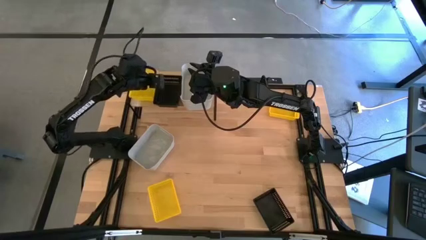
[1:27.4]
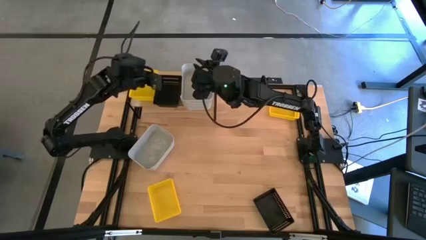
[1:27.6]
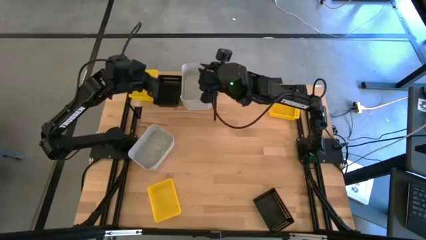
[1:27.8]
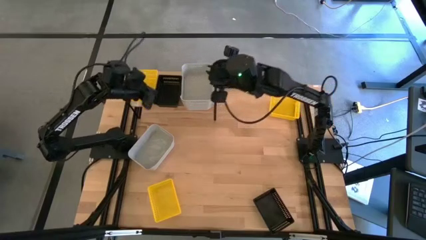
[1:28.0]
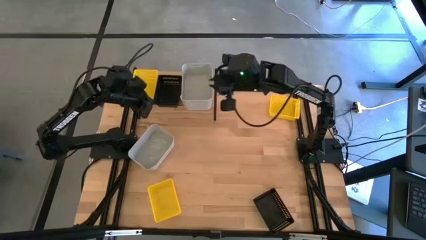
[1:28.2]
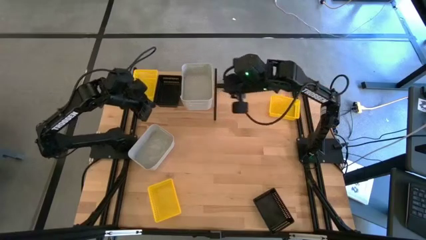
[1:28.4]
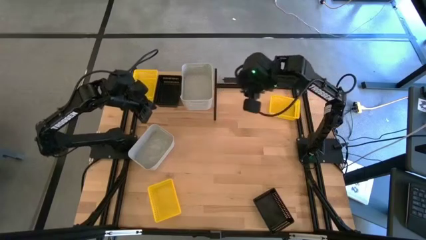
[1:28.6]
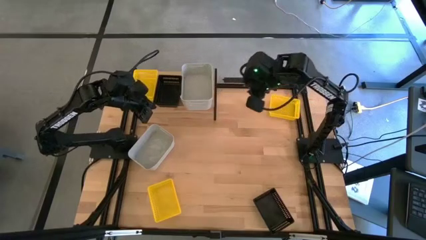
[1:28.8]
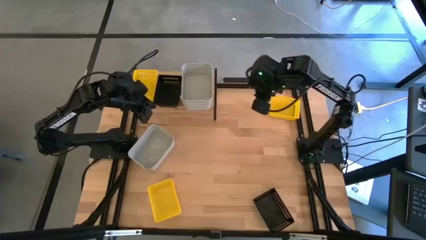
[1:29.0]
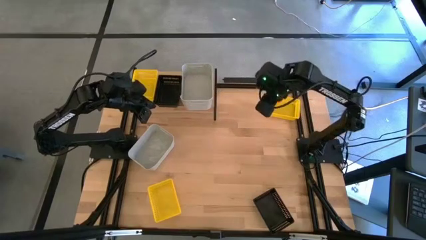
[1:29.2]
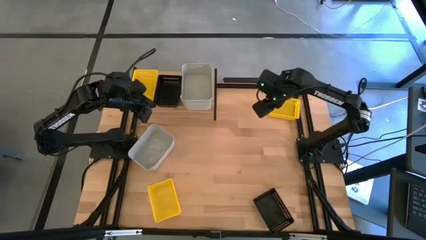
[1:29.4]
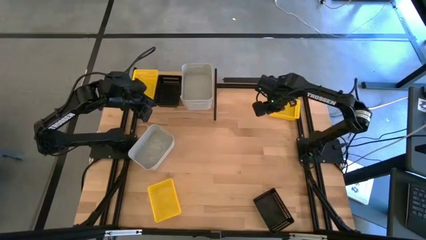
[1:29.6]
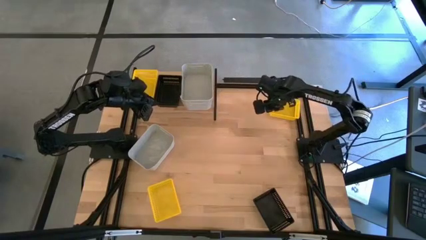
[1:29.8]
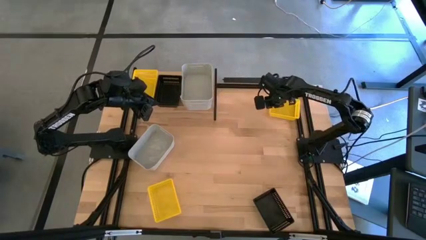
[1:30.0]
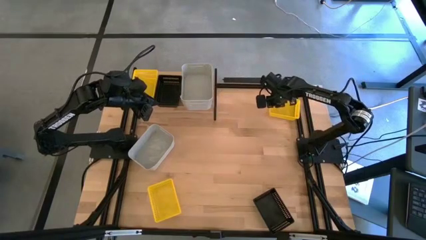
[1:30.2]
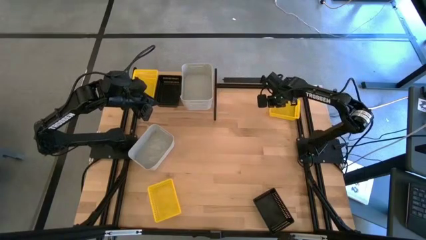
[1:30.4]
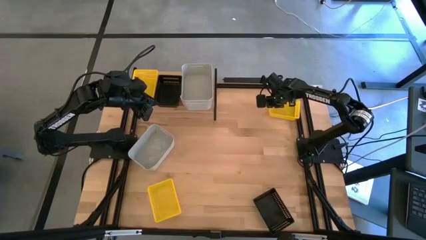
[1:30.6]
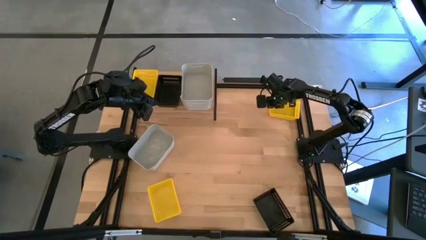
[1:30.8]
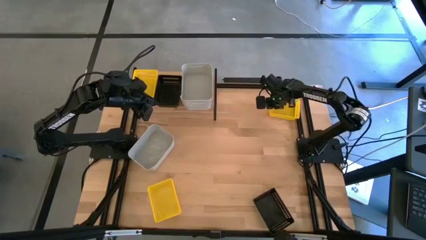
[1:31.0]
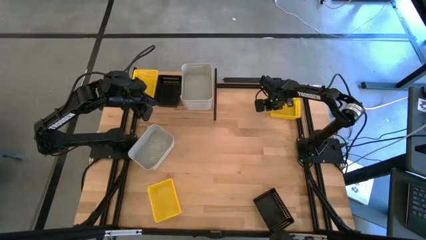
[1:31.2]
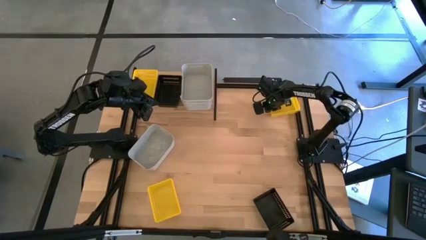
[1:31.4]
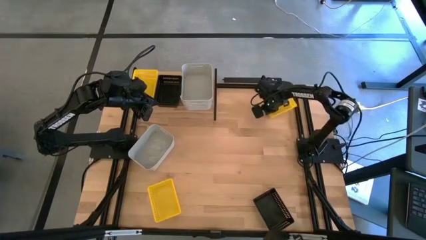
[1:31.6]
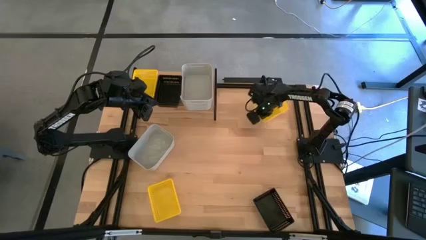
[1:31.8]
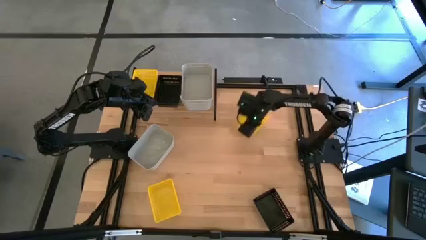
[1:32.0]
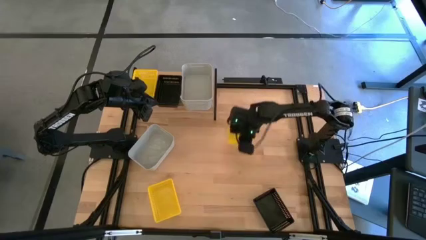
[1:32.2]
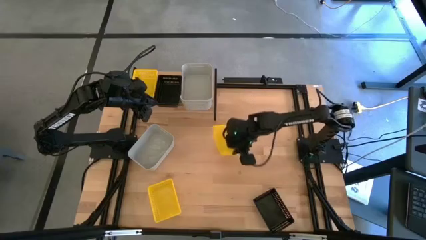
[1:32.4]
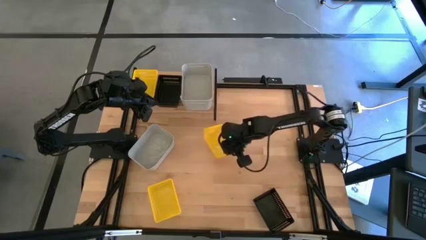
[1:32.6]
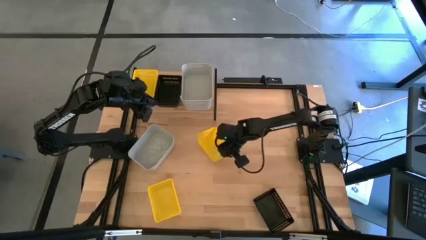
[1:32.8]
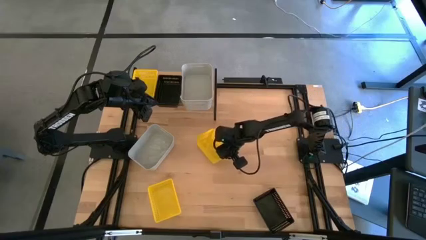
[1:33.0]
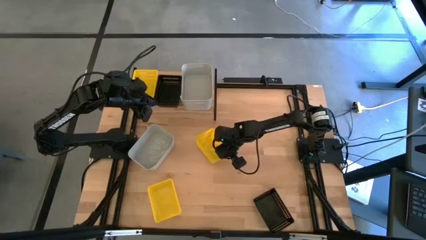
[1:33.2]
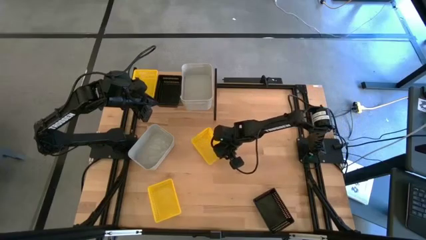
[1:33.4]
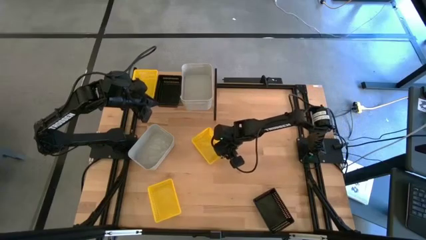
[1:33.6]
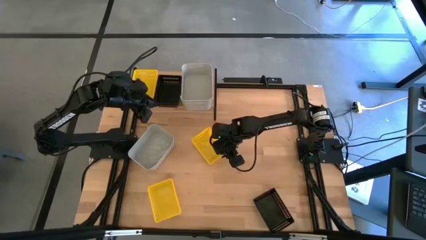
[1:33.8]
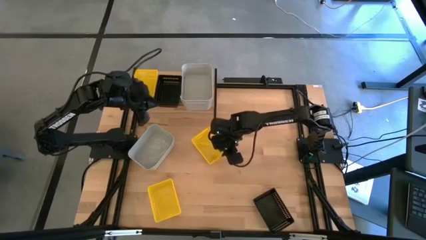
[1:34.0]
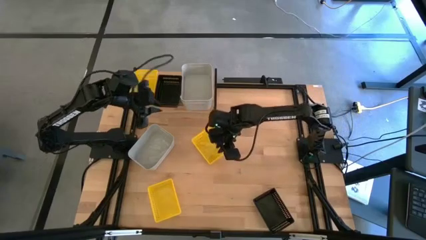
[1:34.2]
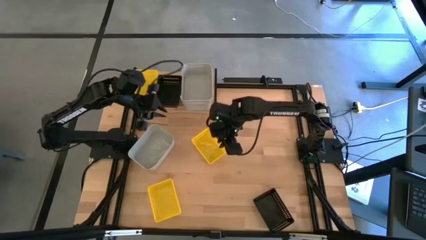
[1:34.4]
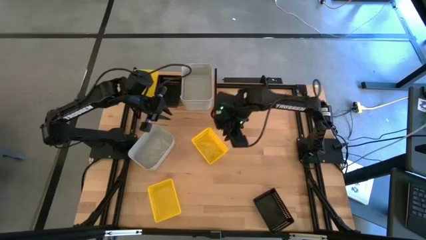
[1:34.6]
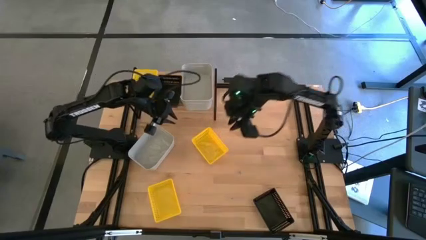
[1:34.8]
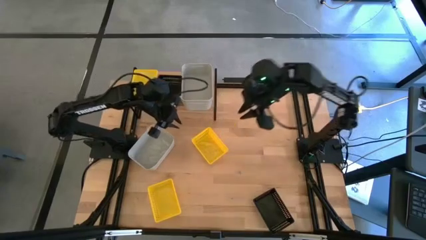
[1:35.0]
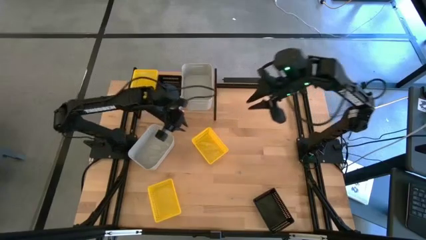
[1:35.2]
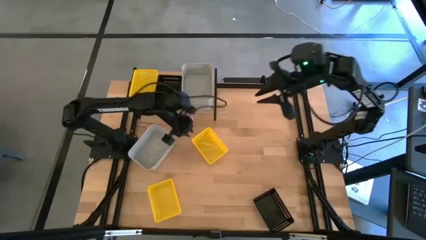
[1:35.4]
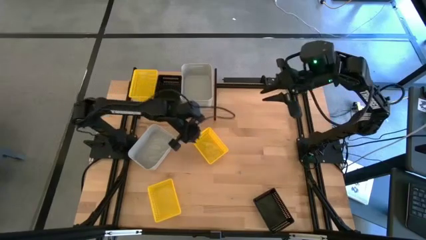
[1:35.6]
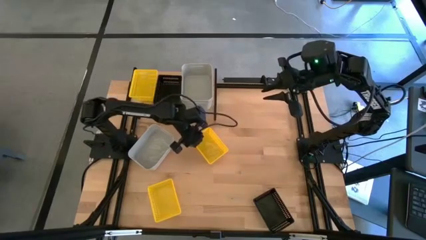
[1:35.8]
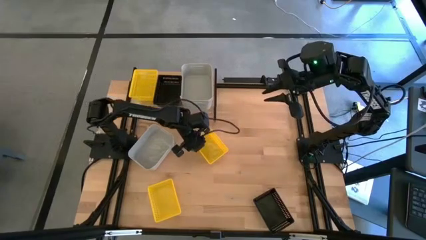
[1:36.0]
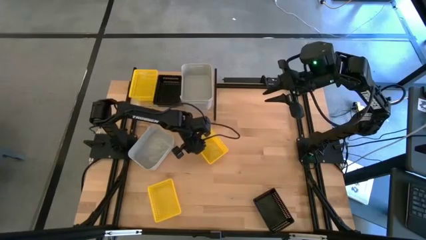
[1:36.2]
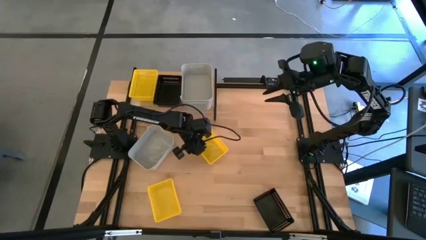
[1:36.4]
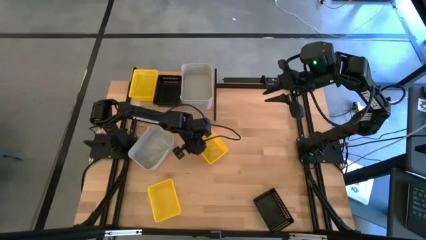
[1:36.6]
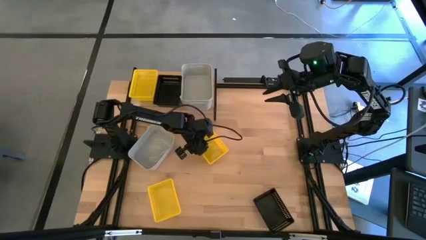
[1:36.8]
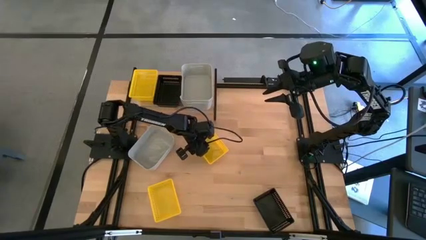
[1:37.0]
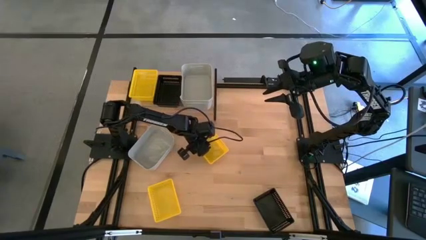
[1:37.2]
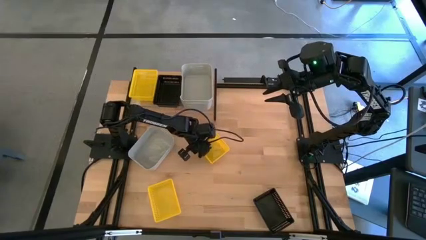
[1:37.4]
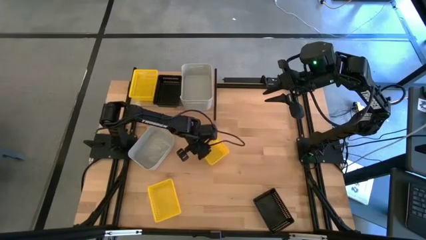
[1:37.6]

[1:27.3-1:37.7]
Task: Stack baskets on shelf by color
Stack the top yellow bin on top of the other yellow bin on the shelf
